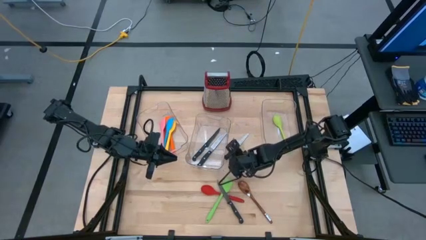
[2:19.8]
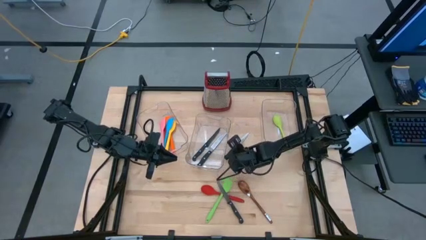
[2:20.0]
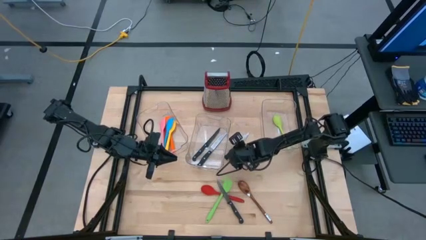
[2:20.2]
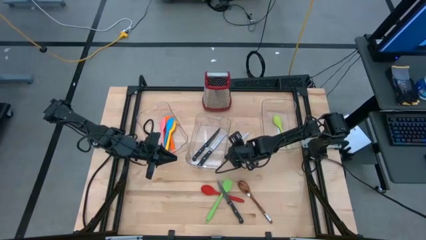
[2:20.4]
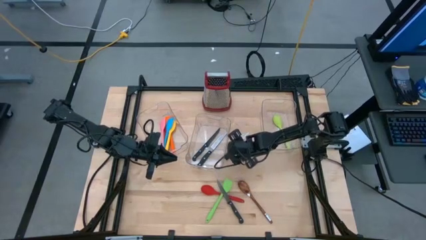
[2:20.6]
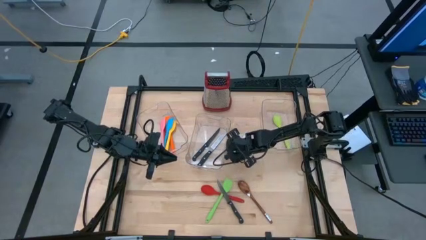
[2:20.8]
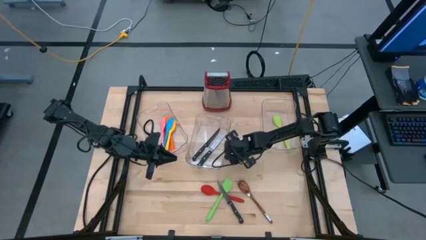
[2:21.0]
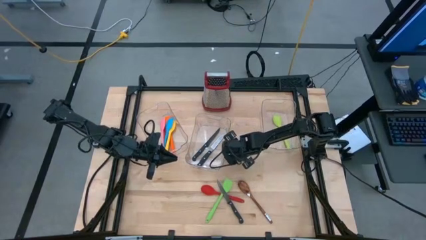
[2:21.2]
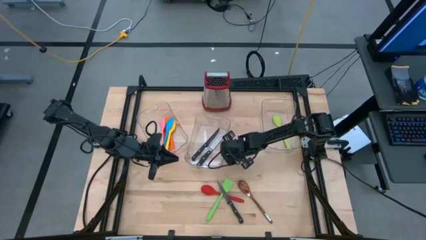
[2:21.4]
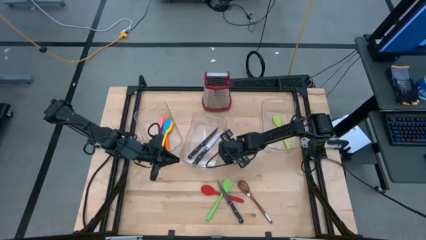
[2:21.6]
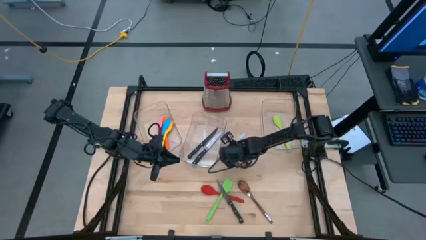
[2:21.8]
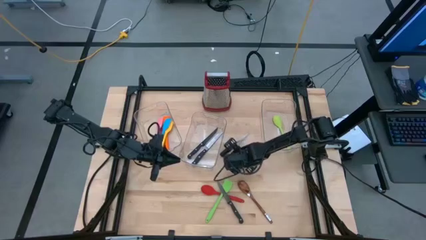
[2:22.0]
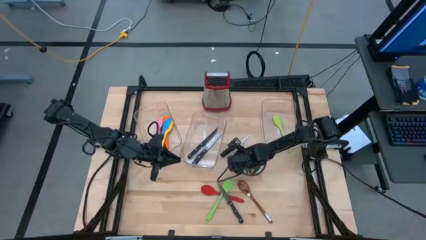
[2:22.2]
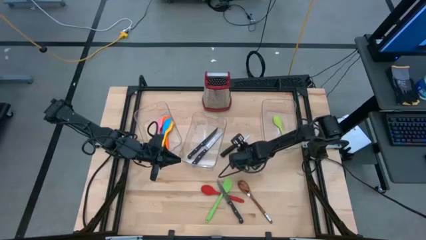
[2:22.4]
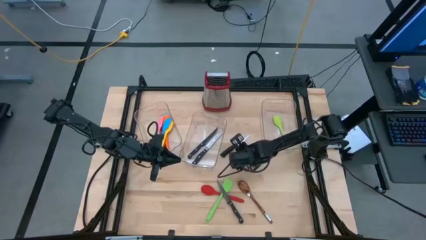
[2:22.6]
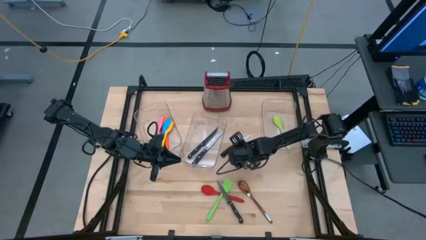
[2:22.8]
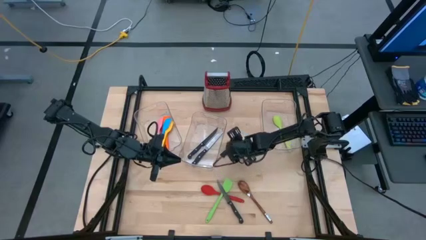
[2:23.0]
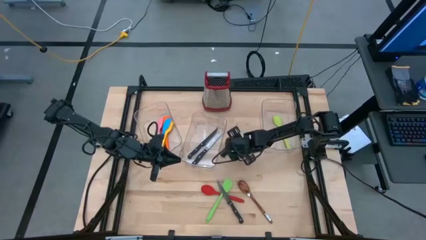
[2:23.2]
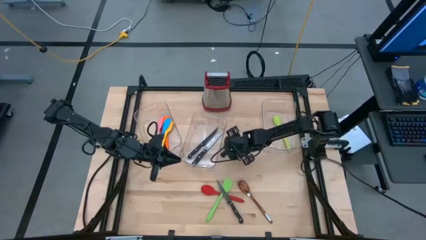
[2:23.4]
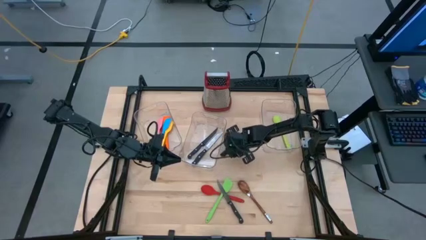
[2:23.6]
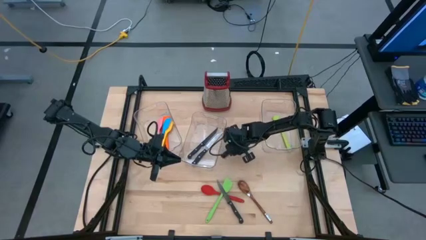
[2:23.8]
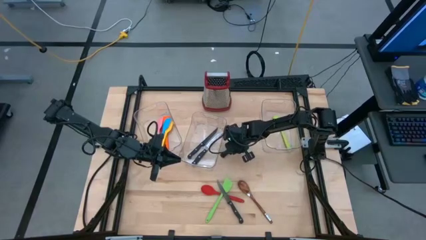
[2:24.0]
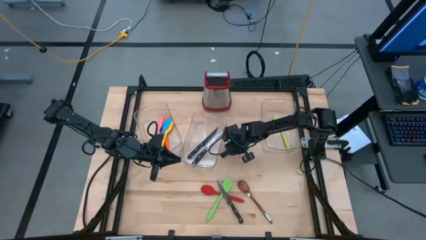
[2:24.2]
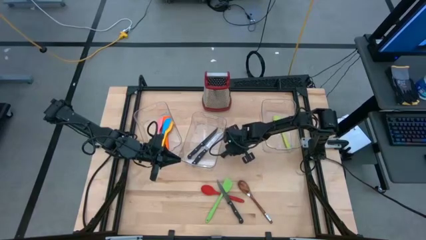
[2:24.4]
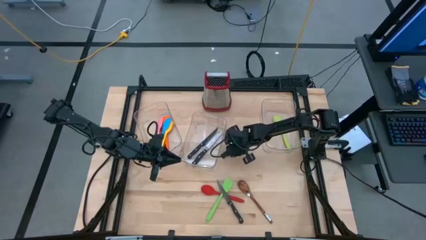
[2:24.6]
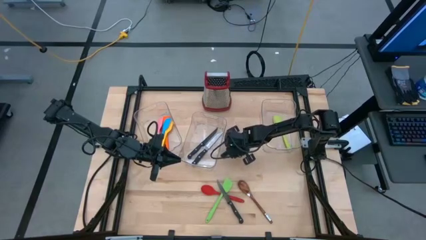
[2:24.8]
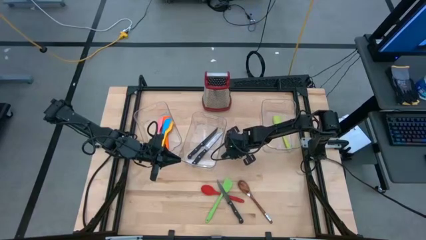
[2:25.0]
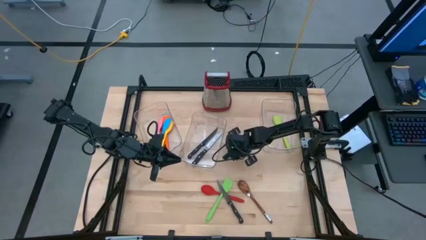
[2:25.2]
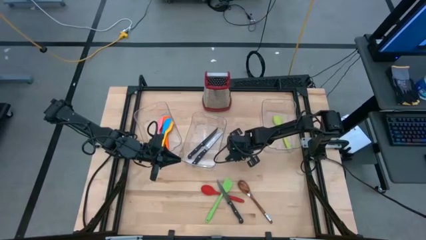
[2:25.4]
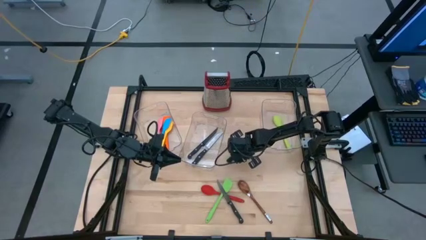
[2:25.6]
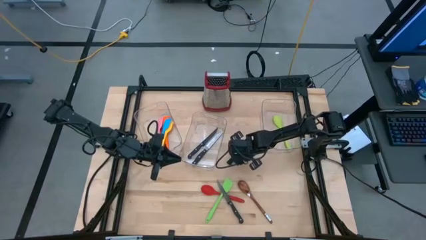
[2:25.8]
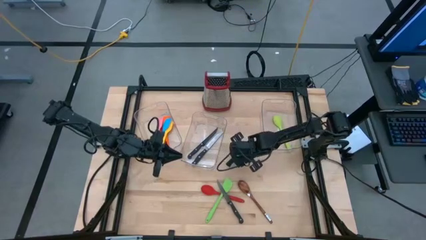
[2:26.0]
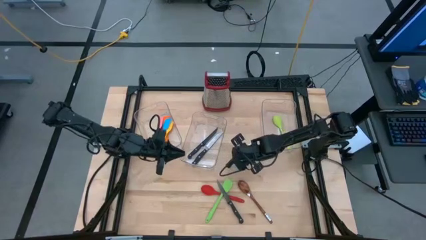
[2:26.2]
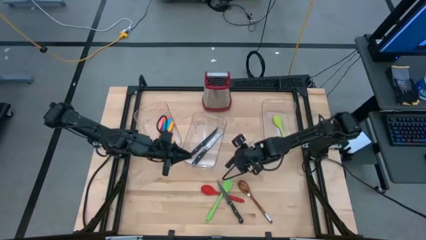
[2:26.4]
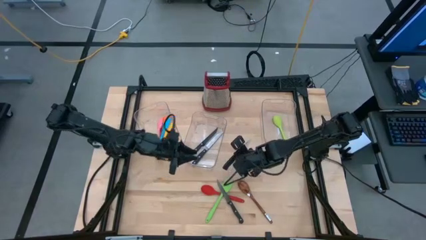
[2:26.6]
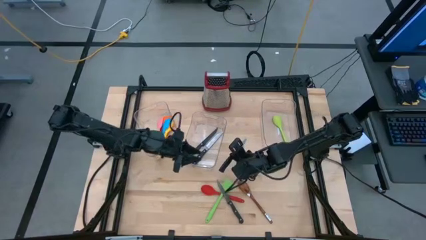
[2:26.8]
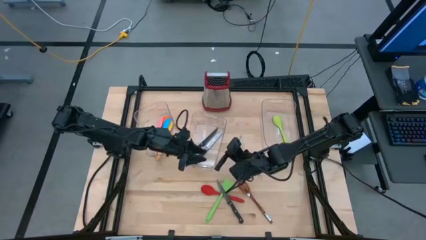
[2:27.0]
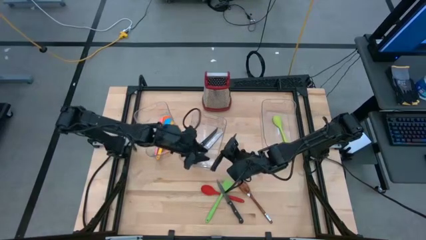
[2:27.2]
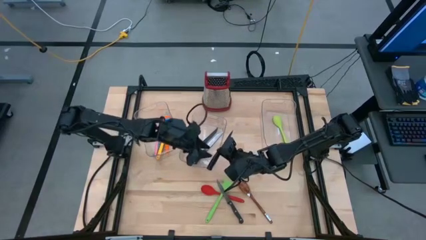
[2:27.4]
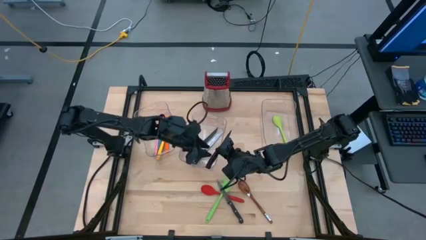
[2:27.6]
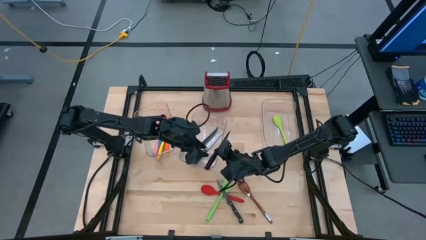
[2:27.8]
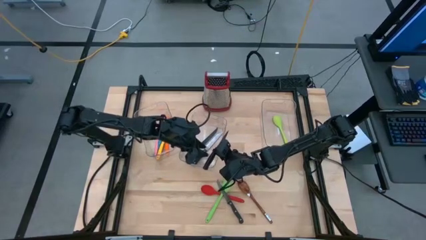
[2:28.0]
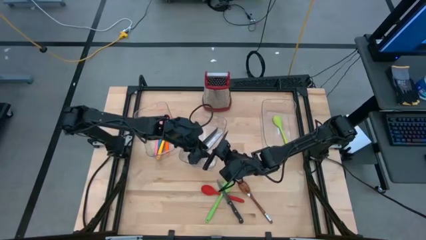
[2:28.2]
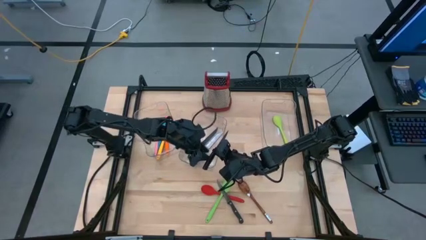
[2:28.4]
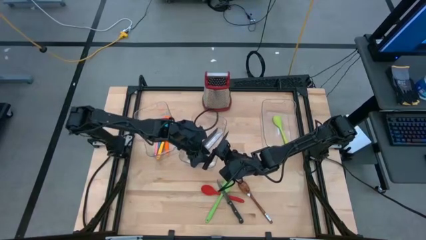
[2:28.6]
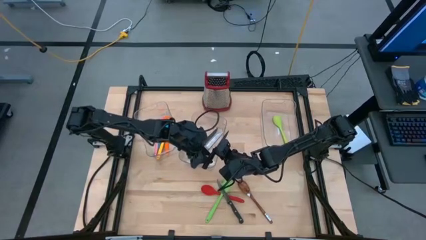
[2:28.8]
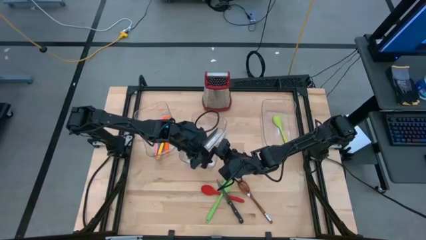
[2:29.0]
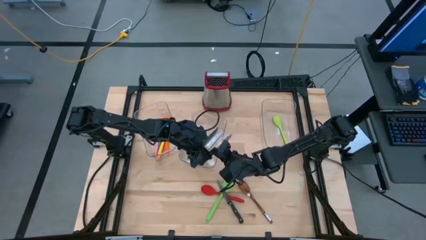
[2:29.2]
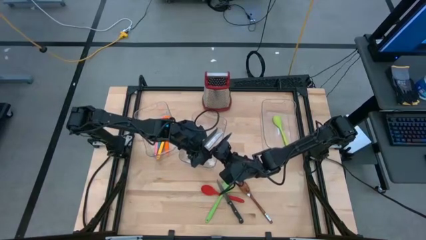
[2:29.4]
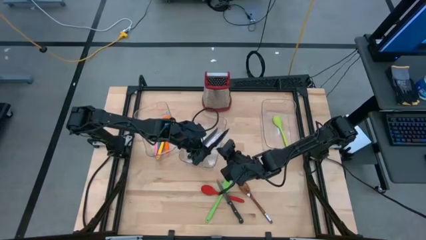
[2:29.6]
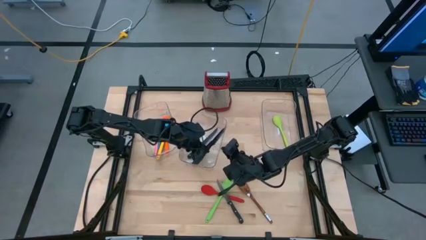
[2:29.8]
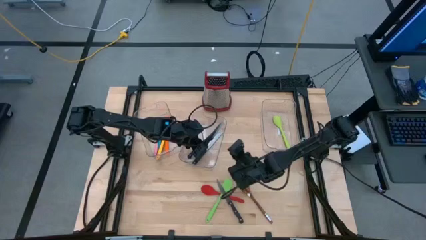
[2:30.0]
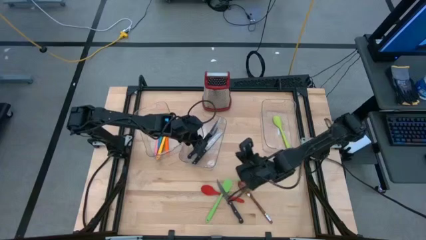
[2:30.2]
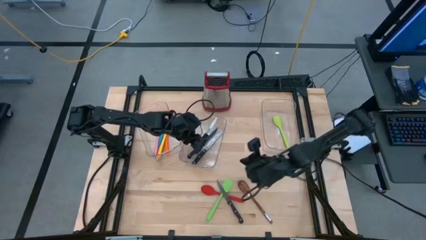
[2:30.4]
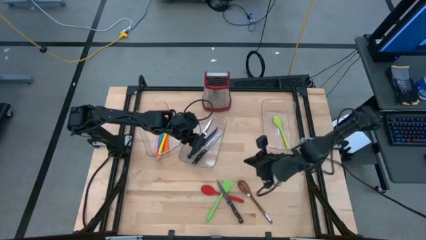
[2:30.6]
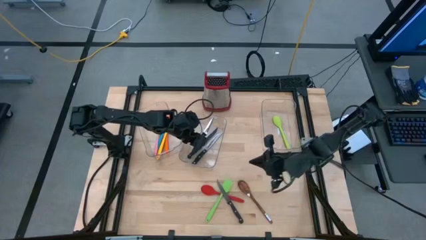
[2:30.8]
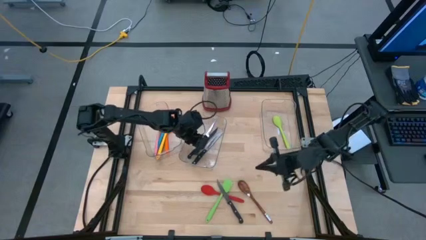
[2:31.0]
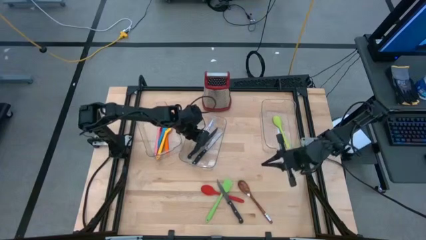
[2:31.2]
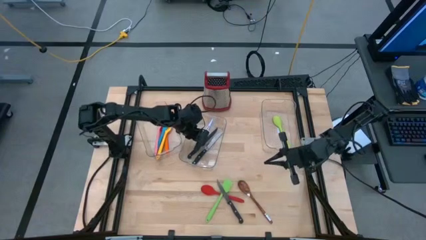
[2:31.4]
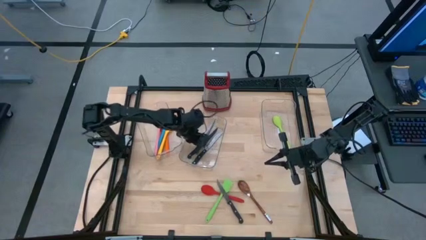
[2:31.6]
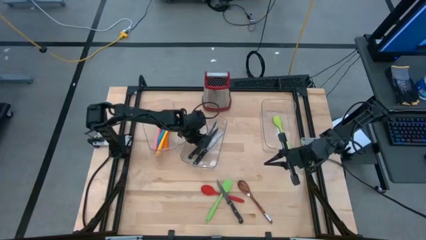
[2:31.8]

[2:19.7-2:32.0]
Task: Pick & Place Kitchen Items
Put the black knife into the middle transparent bin
